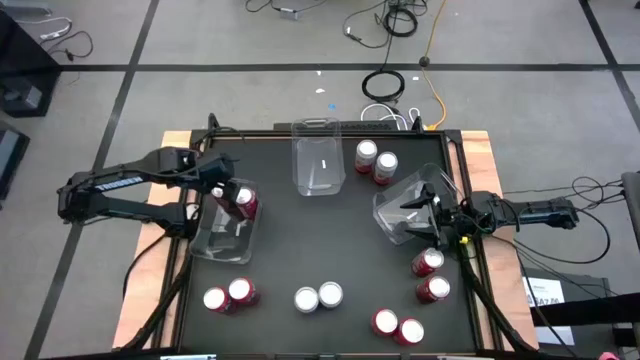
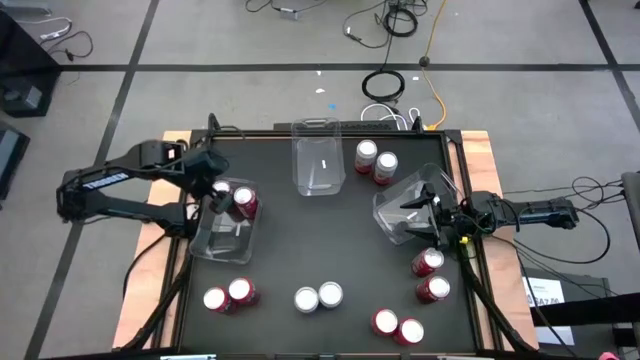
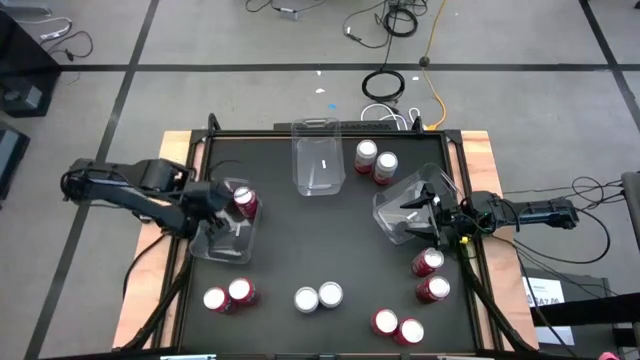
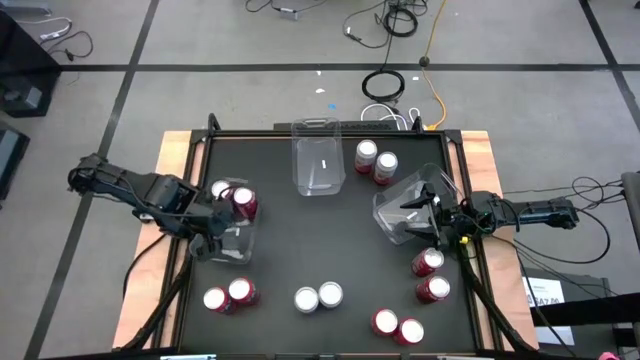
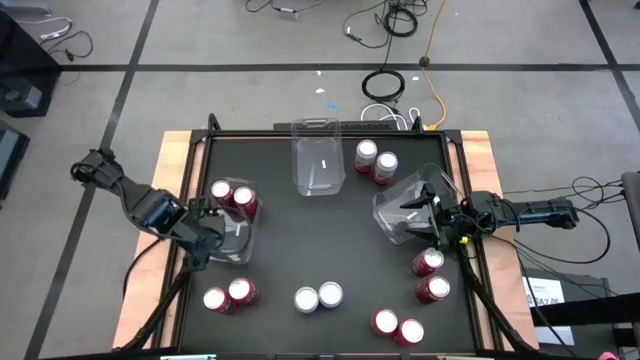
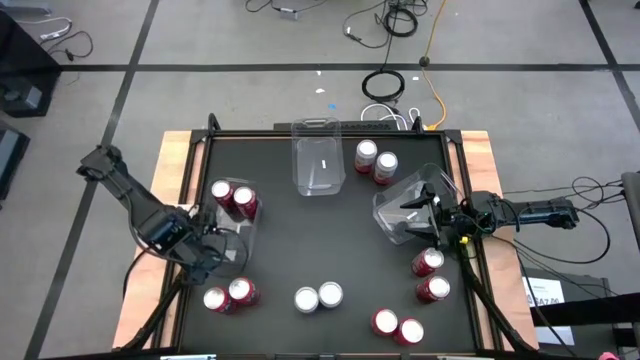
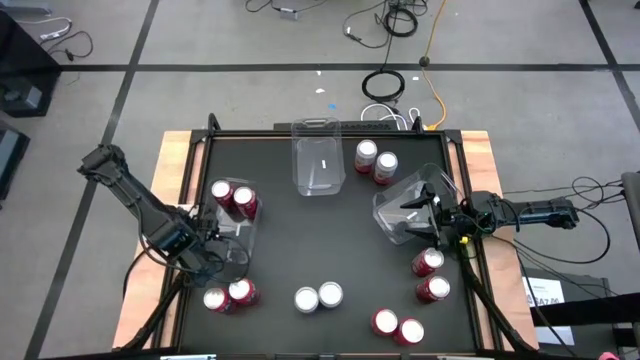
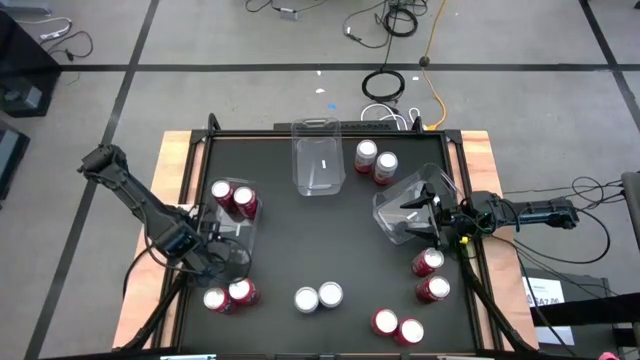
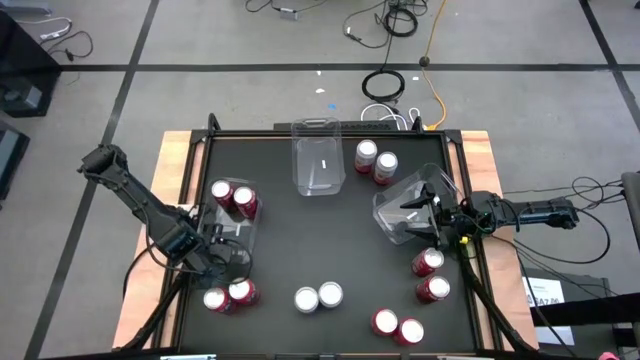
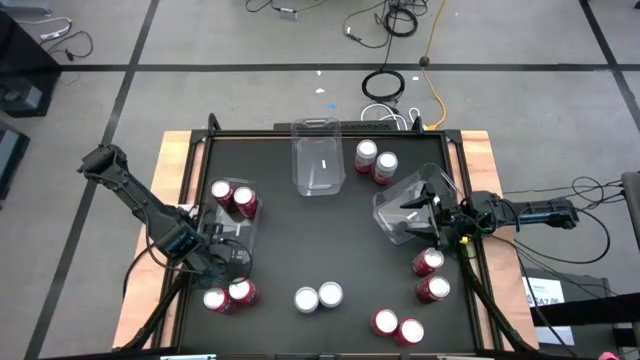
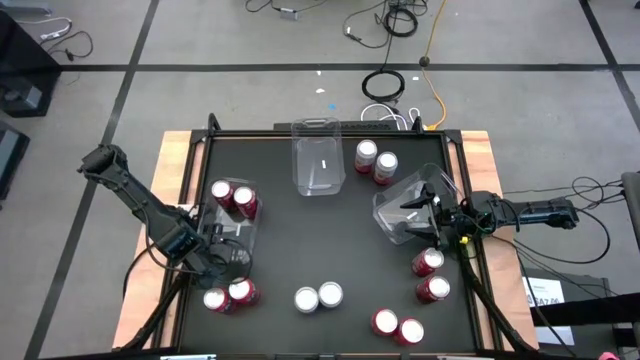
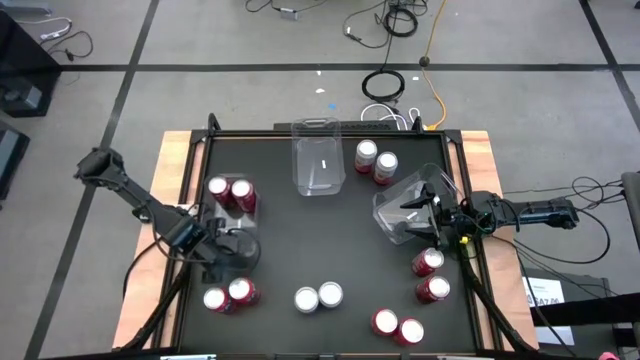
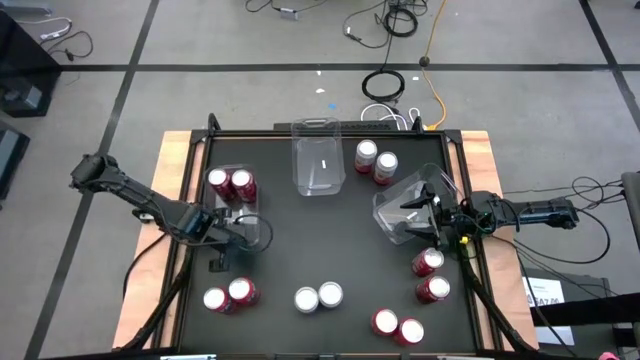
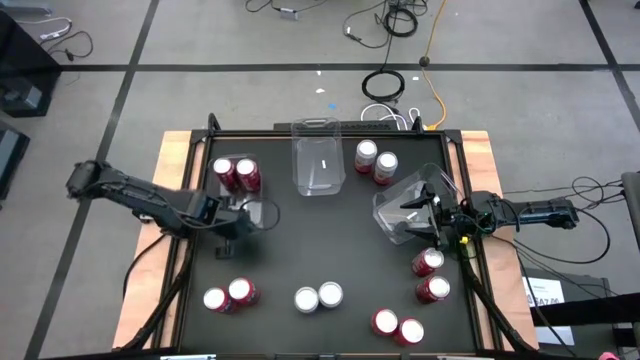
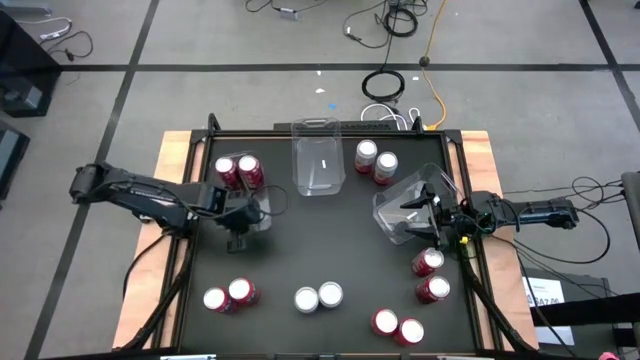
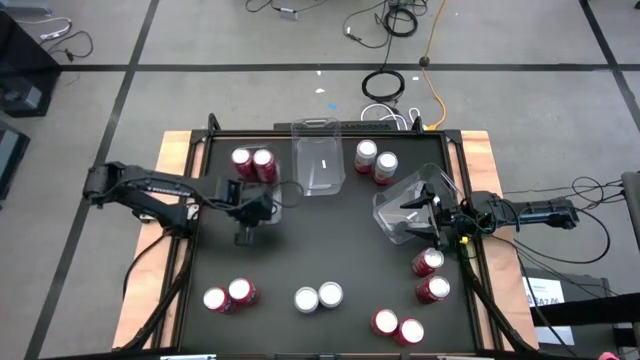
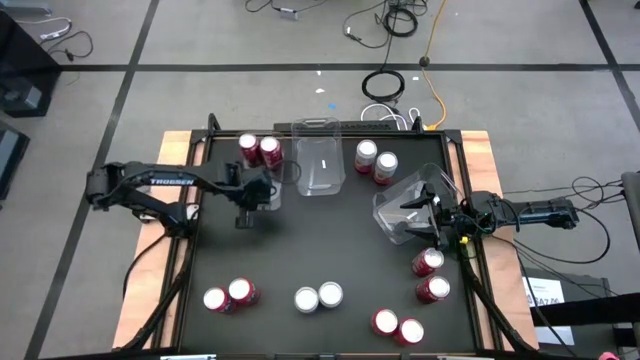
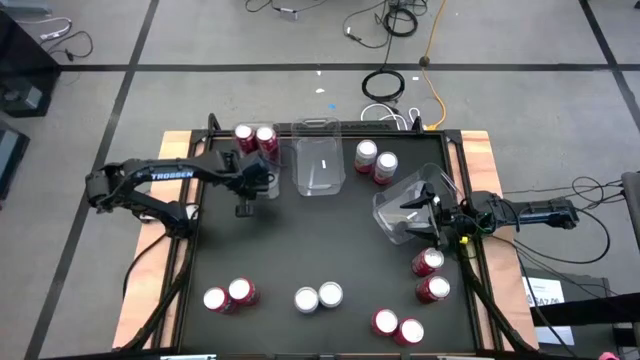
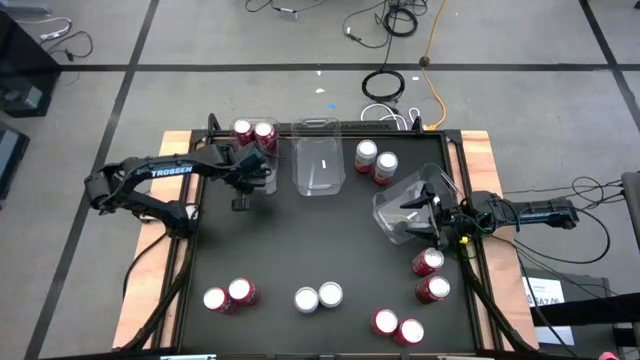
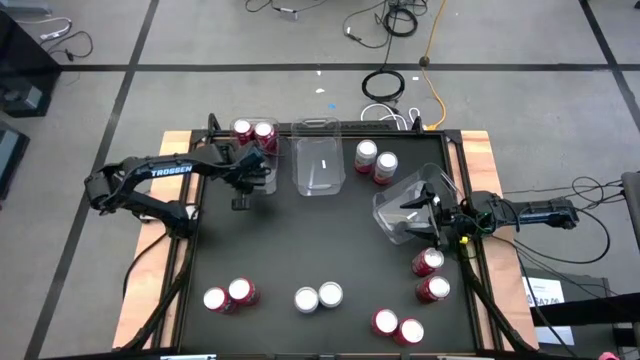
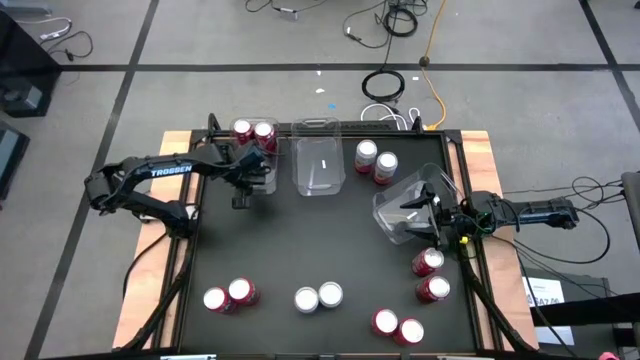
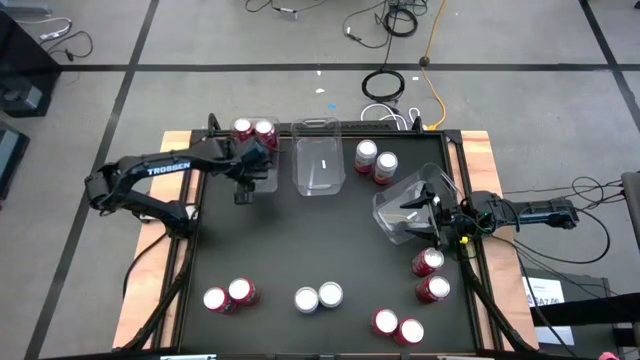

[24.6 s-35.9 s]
Task: Sort soda cans
Move the transparent bin from to the top left of the table

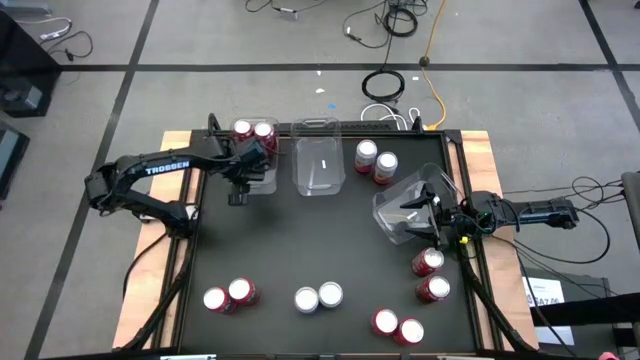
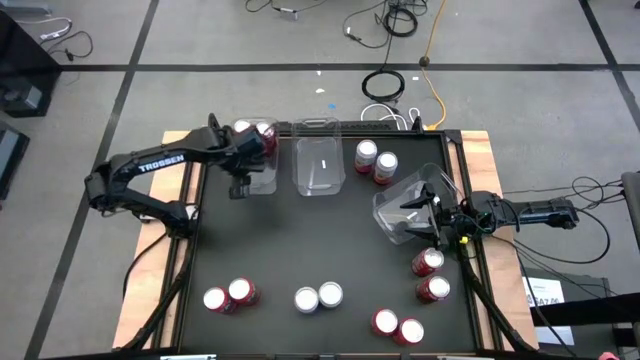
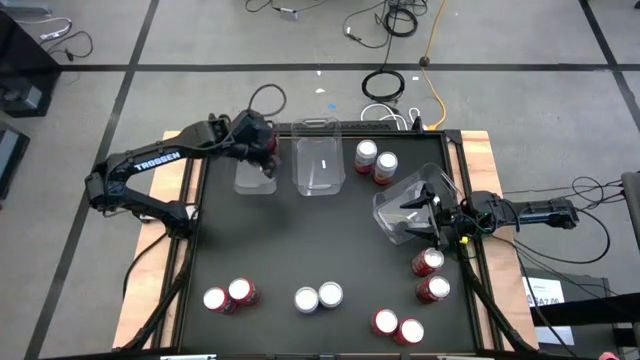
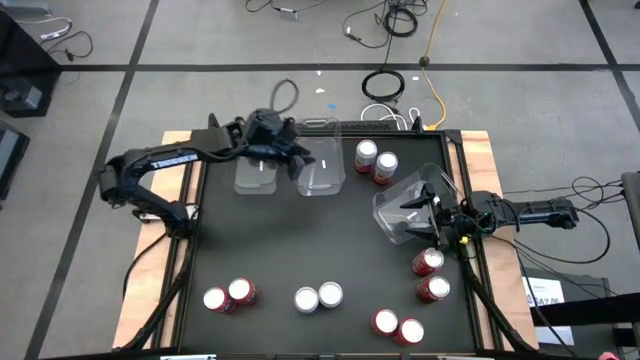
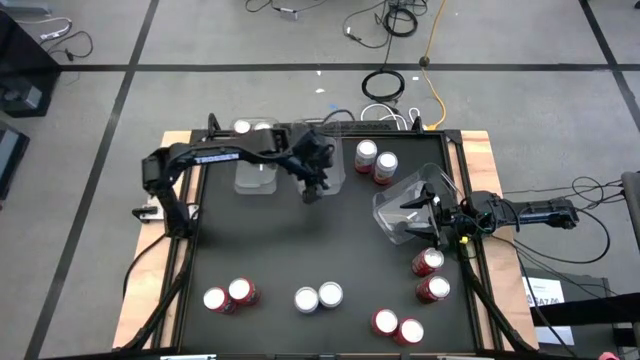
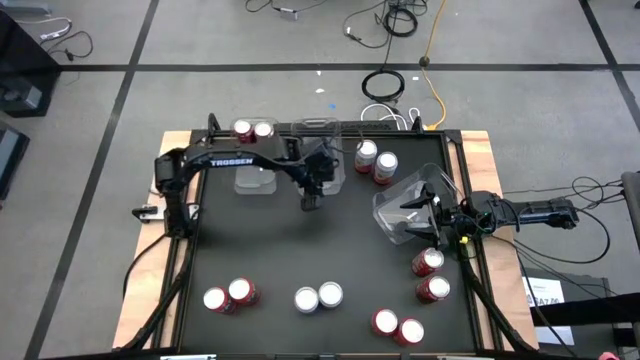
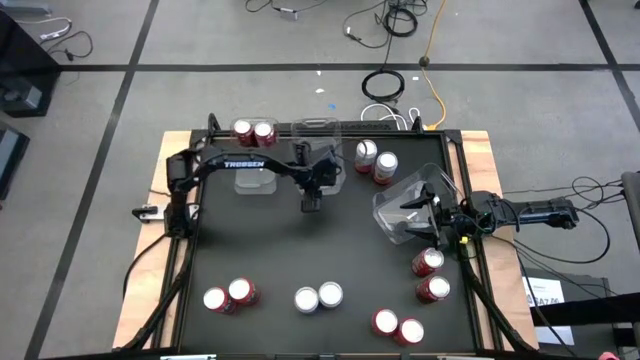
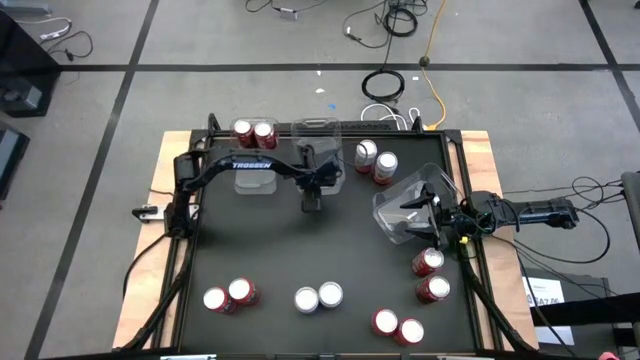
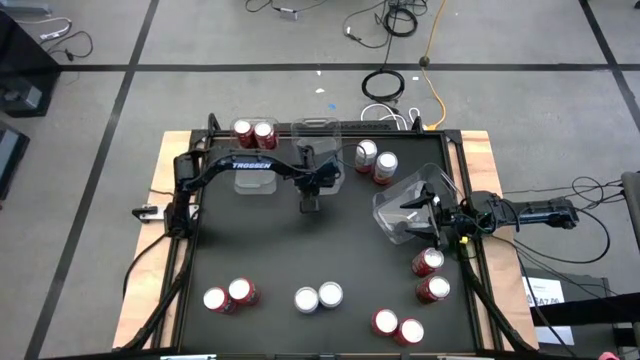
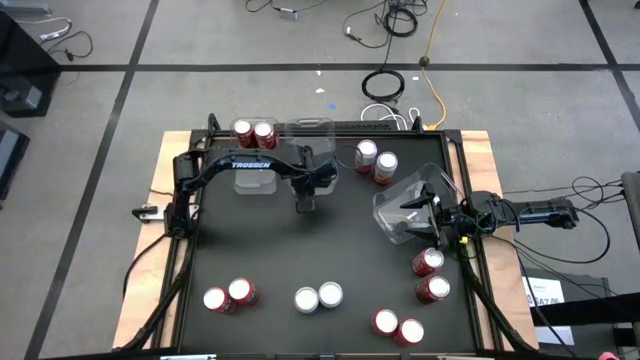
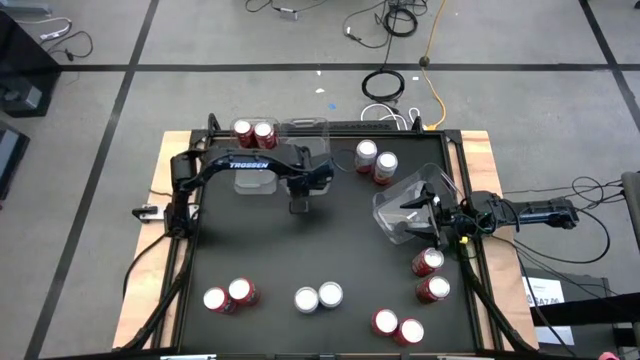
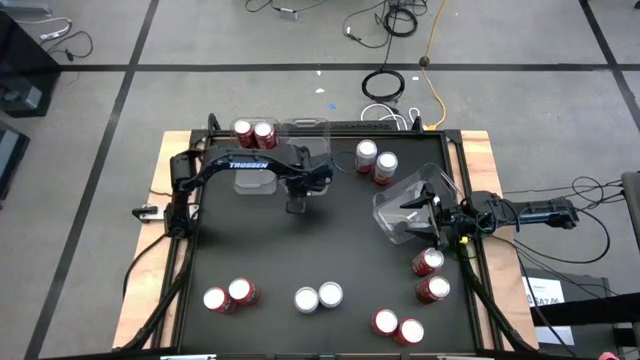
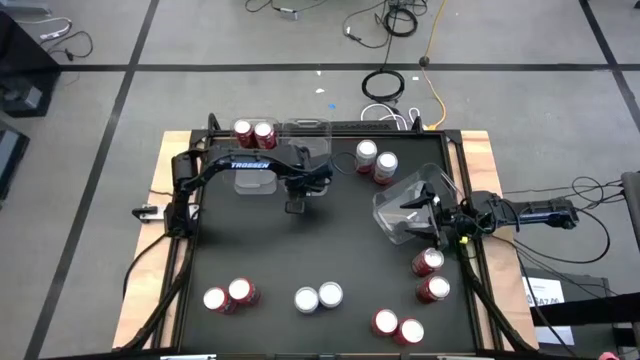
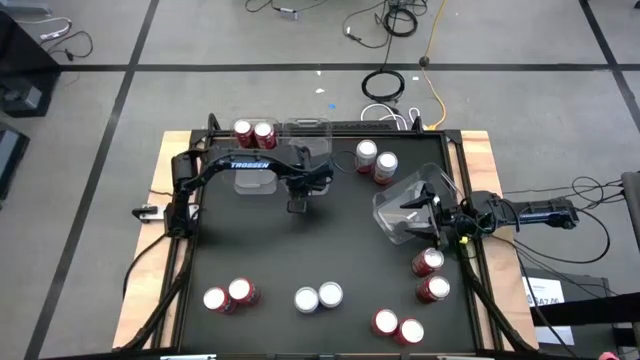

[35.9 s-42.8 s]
Adjust the middle transparent bin

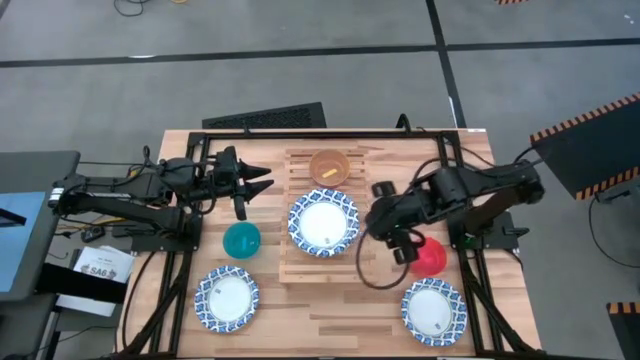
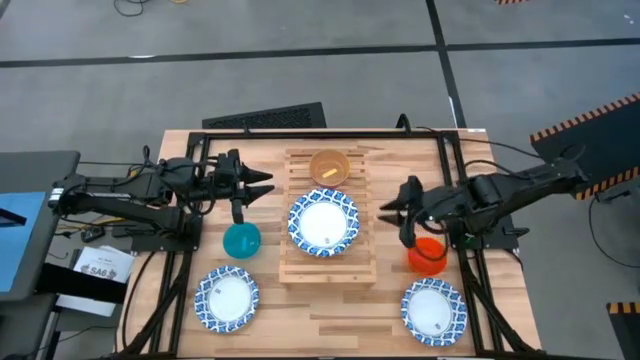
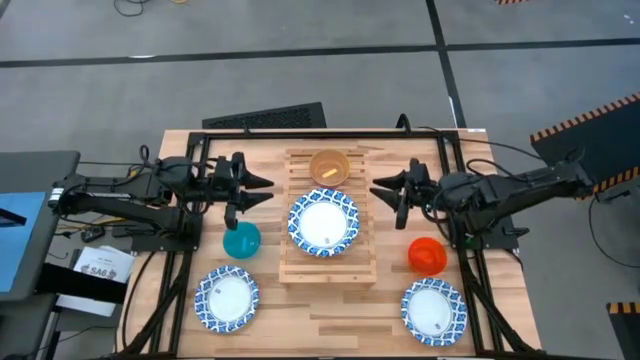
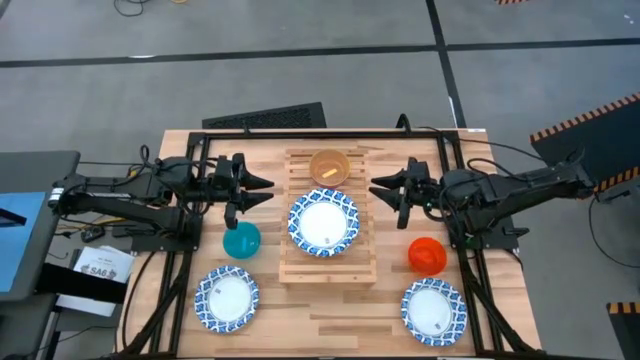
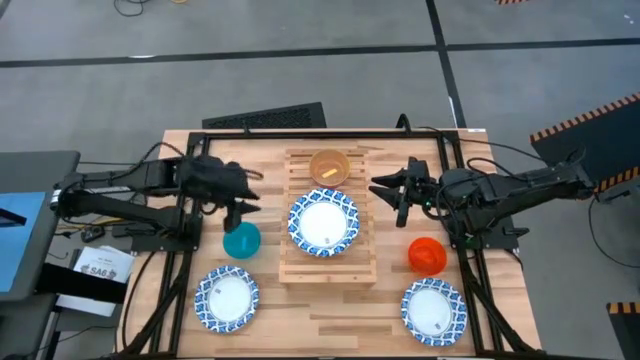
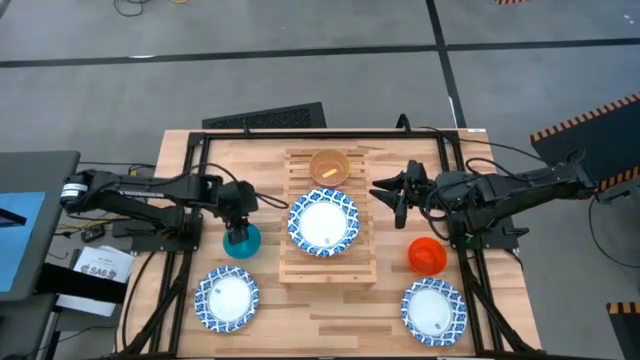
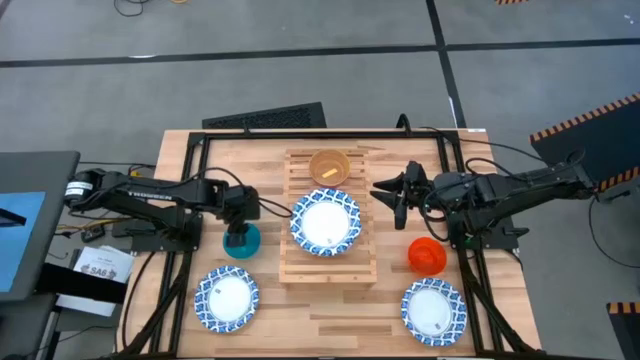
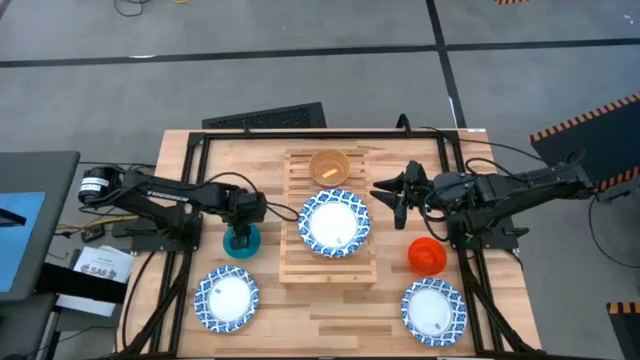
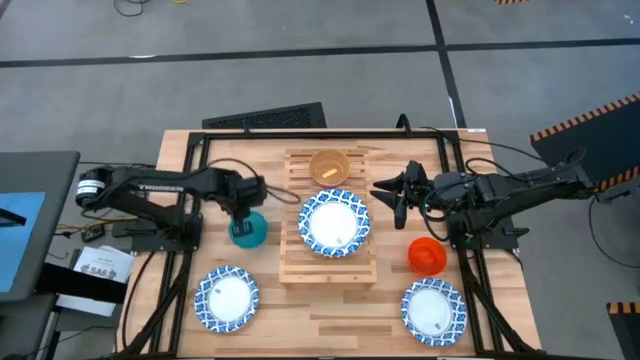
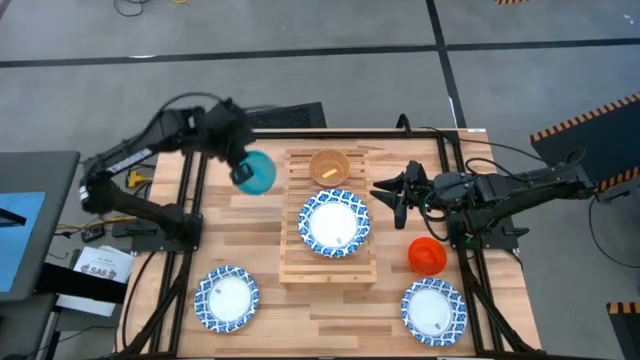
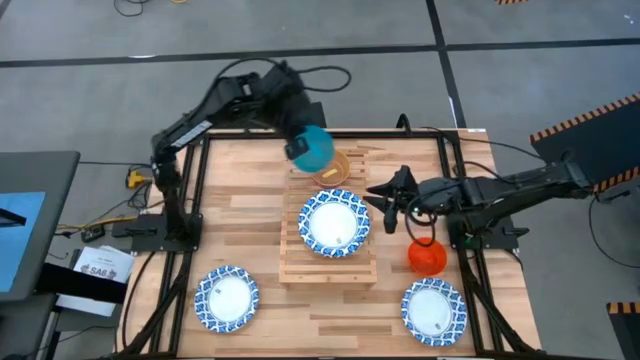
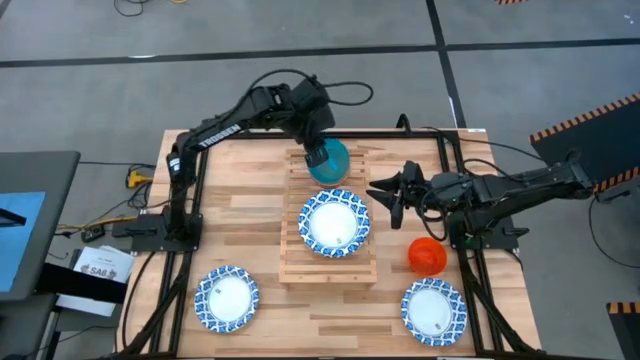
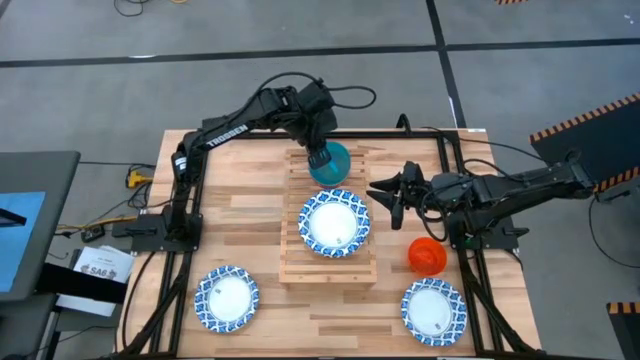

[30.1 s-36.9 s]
Task: Place and stack bowls onto a shelf
Stack the blue bowl on top of the yellow bowl on the shelf
